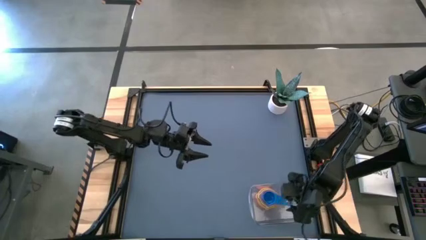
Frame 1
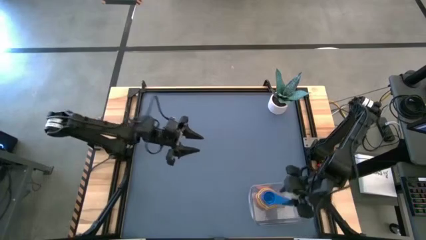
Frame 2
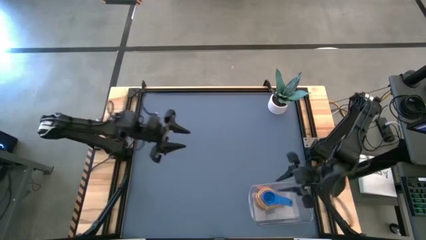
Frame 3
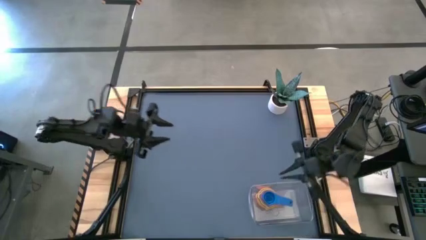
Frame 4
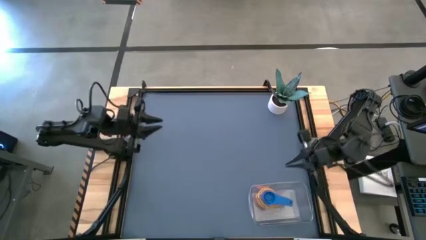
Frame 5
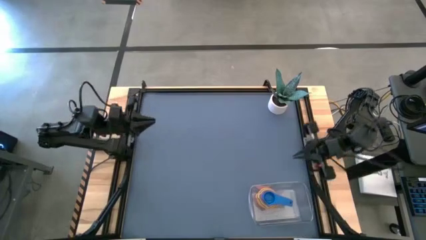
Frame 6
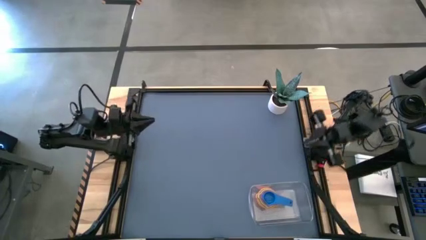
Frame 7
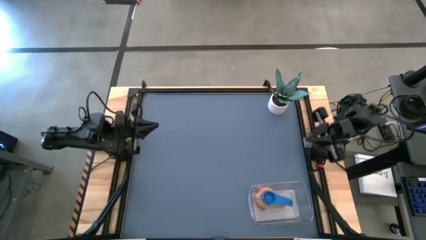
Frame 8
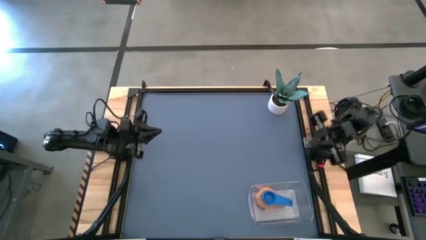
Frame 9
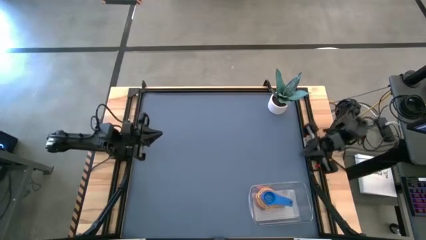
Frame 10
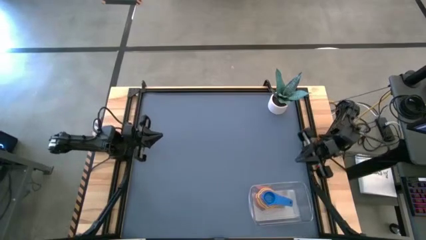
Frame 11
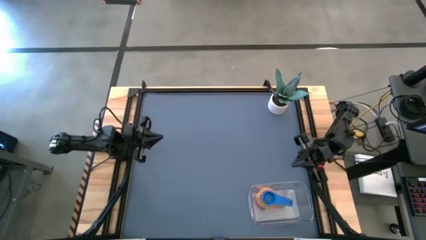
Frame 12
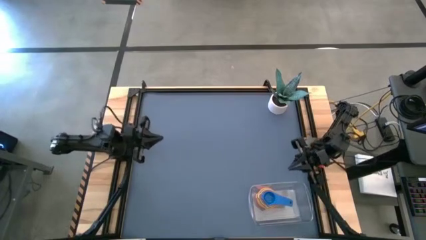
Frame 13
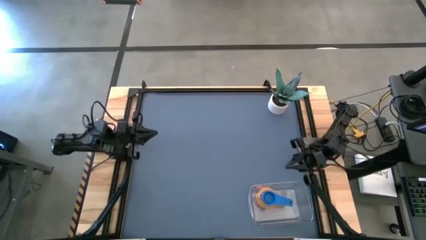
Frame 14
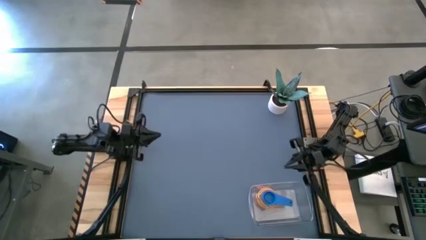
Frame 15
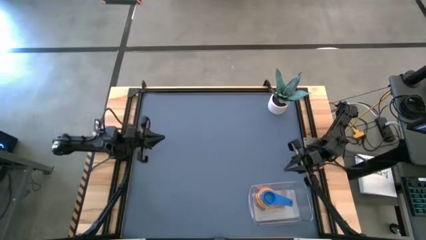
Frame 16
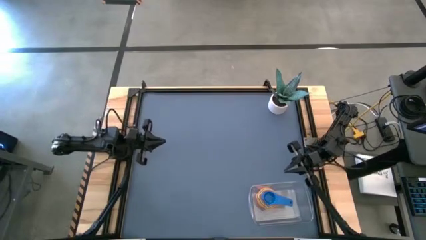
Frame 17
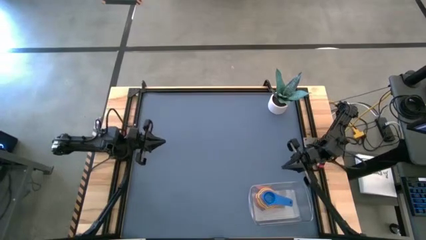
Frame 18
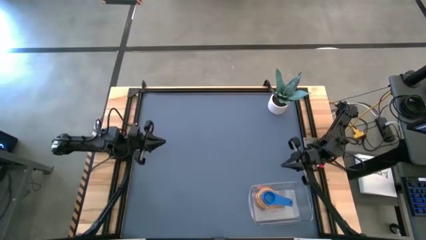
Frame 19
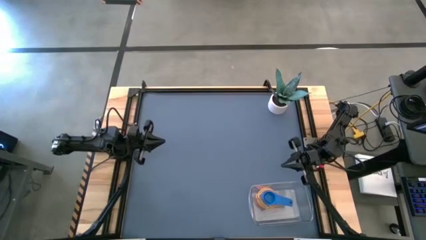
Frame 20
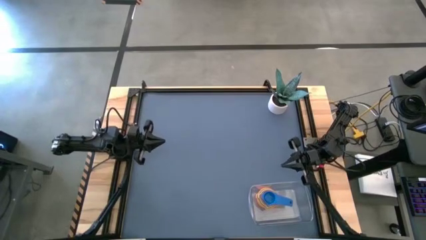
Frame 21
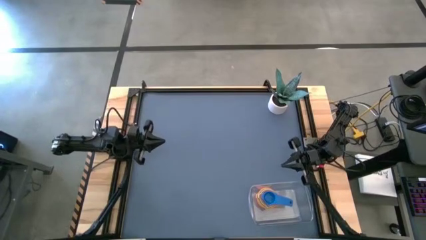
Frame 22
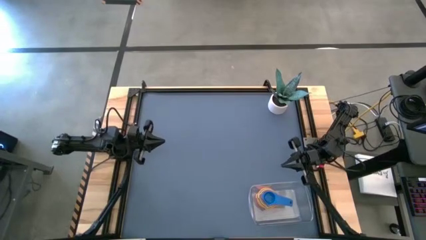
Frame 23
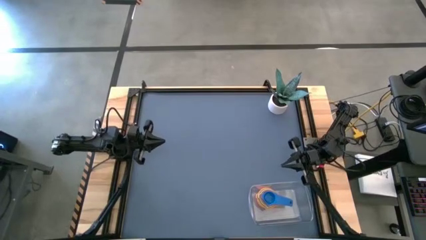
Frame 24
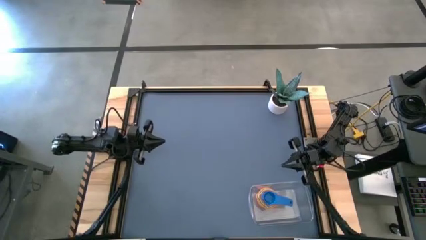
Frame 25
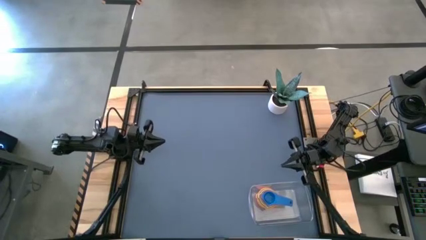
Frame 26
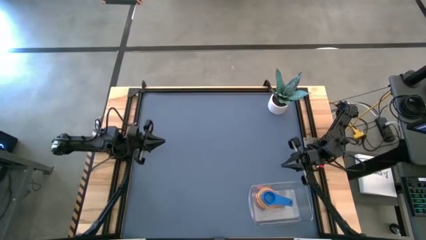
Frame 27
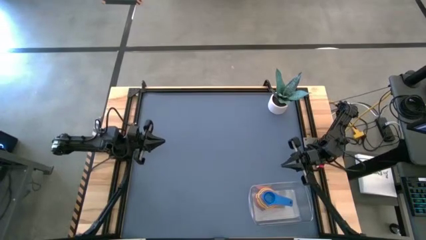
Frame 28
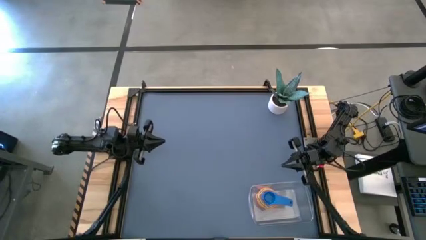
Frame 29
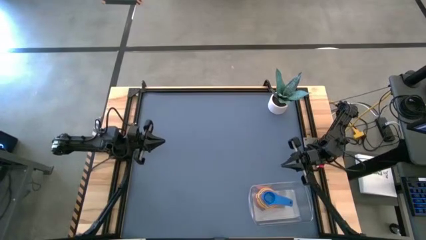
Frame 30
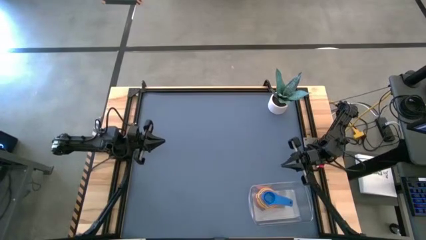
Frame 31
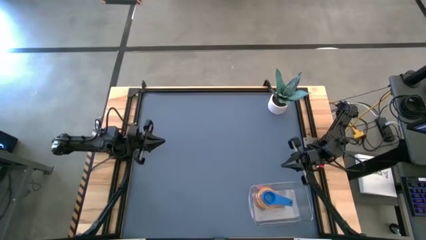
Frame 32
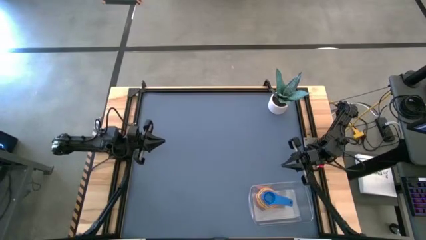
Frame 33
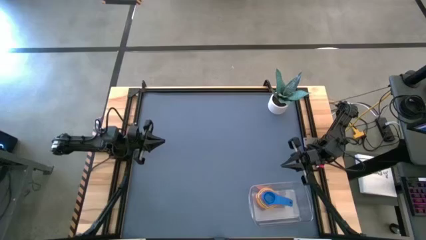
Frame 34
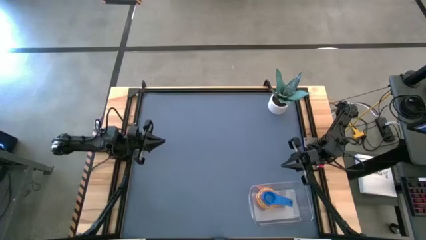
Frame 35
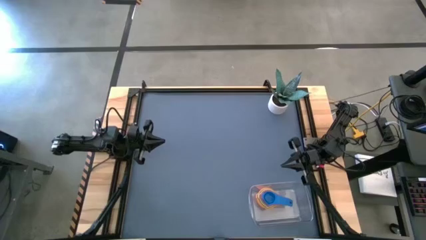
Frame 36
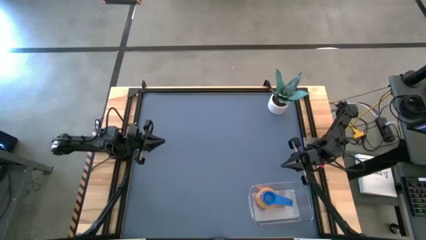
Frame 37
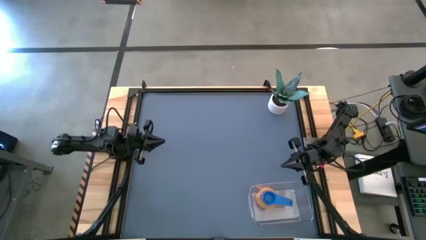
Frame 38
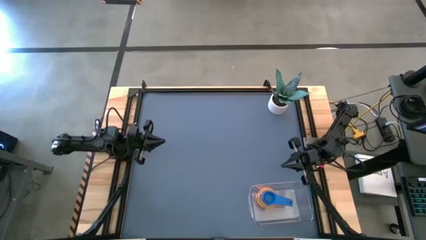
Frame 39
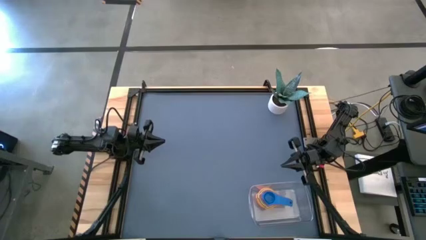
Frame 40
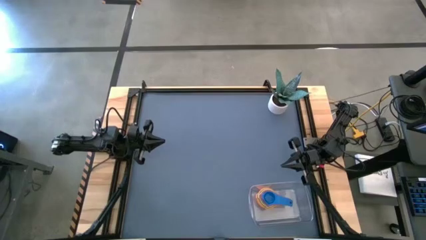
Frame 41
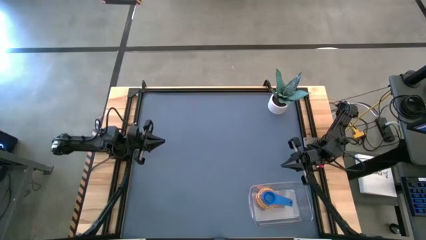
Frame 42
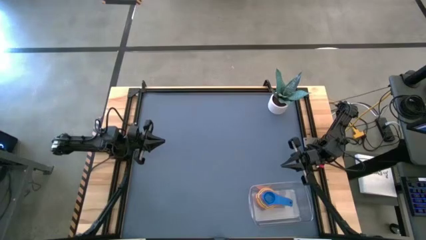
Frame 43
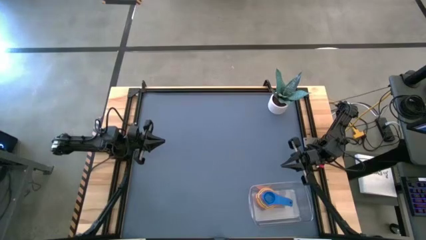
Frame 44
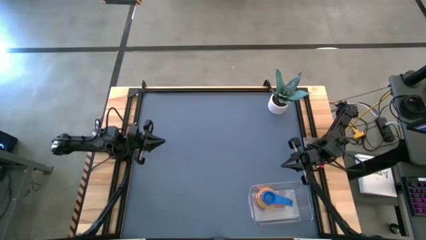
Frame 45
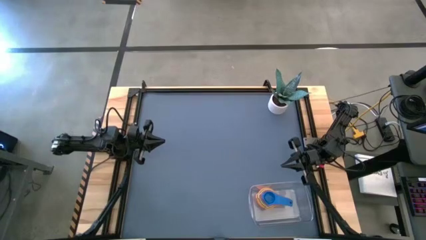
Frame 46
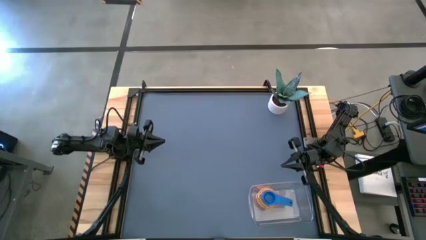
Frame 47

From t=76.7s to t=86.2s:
Task: Nest measuring cups in basket
Return to Home Position

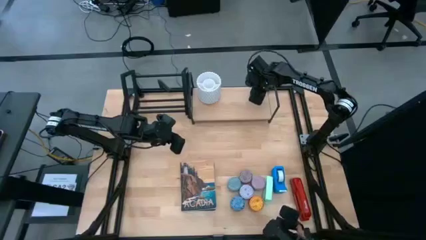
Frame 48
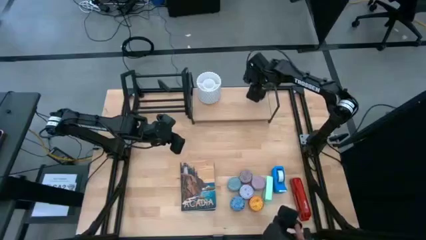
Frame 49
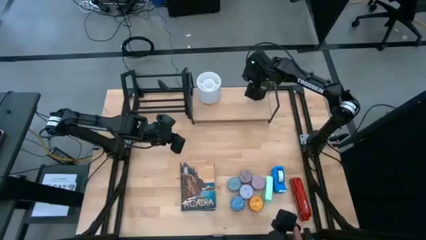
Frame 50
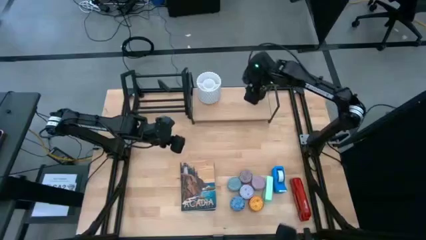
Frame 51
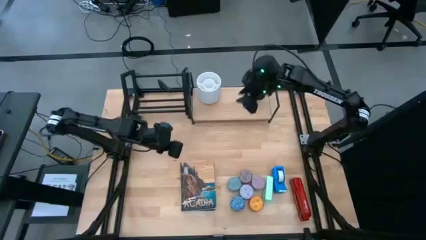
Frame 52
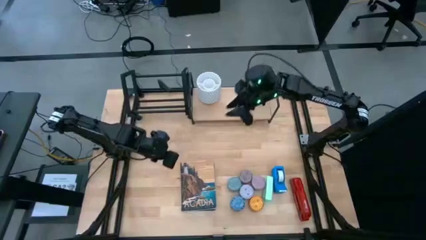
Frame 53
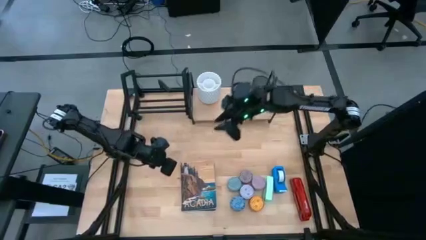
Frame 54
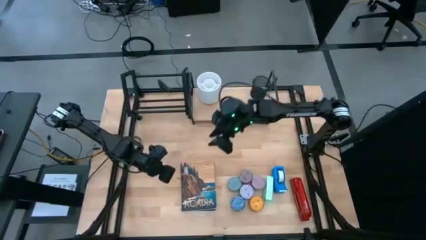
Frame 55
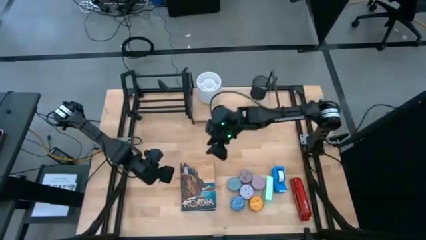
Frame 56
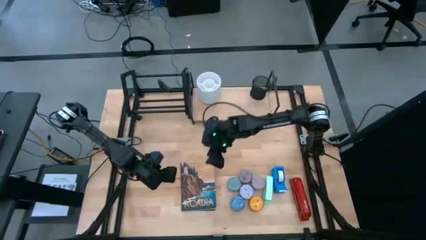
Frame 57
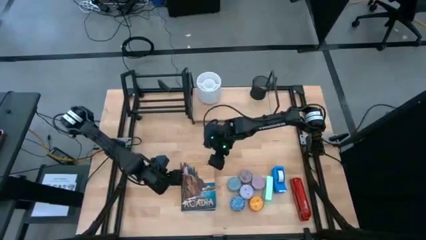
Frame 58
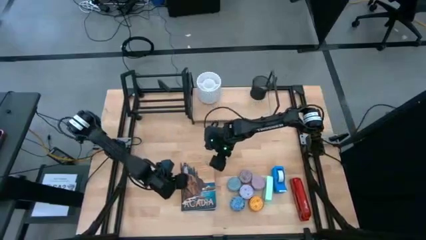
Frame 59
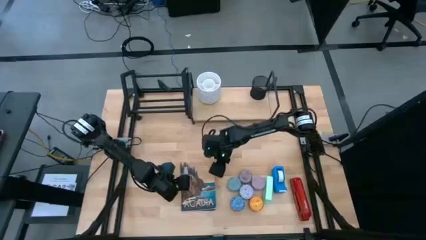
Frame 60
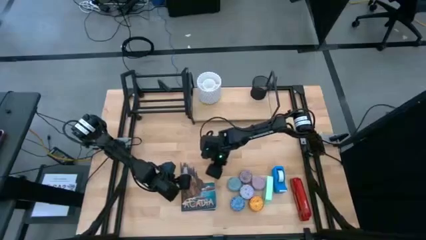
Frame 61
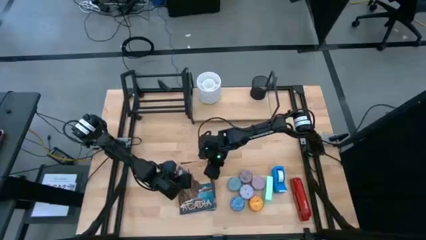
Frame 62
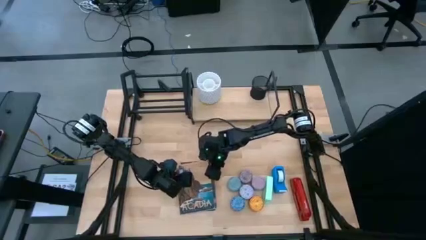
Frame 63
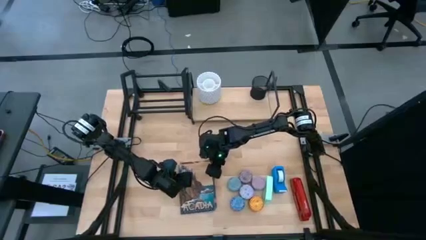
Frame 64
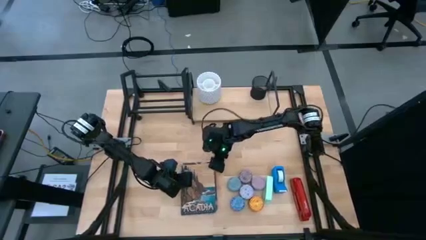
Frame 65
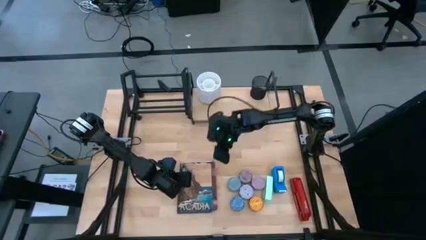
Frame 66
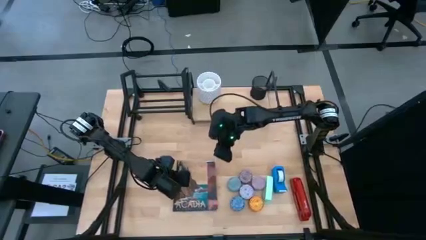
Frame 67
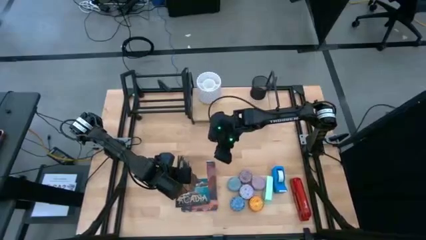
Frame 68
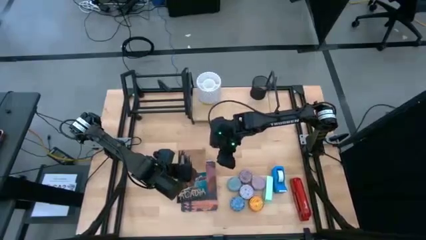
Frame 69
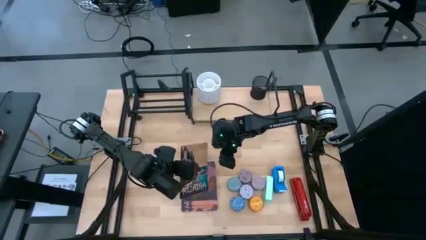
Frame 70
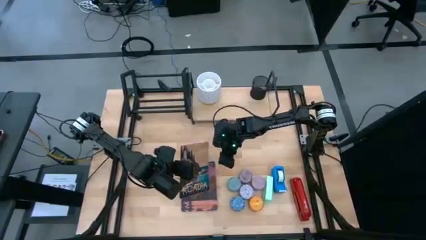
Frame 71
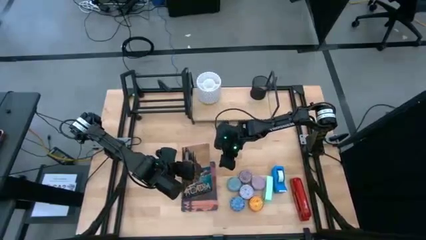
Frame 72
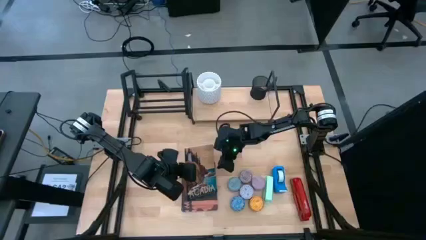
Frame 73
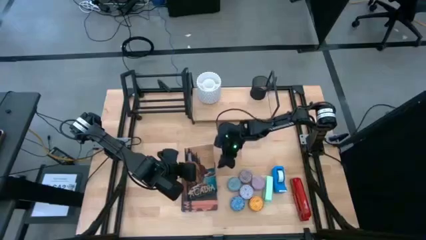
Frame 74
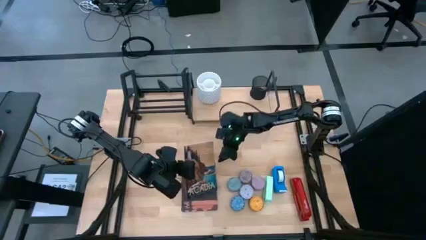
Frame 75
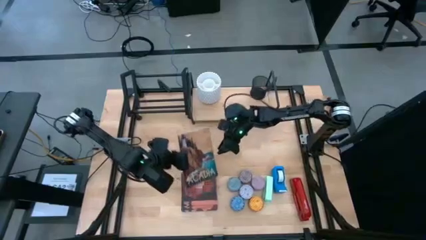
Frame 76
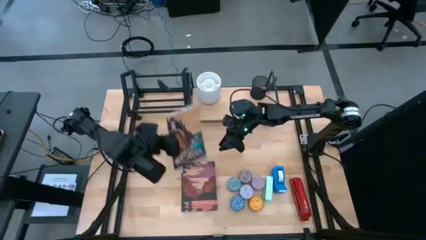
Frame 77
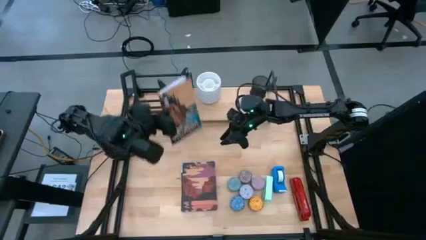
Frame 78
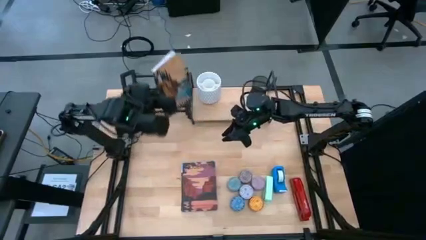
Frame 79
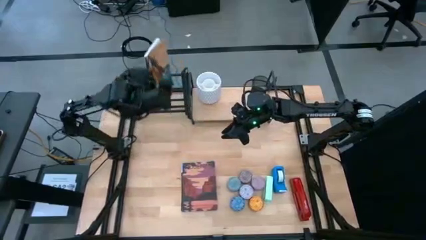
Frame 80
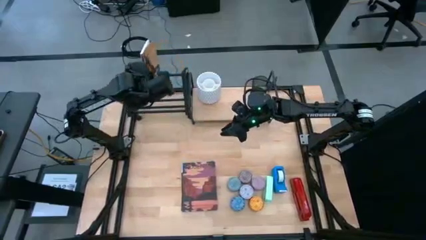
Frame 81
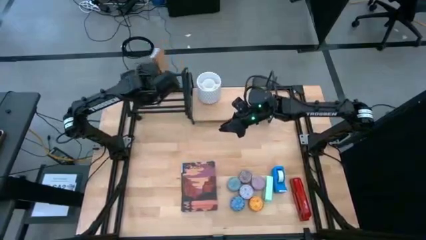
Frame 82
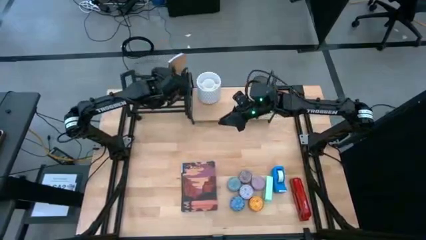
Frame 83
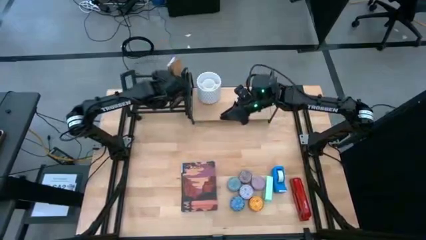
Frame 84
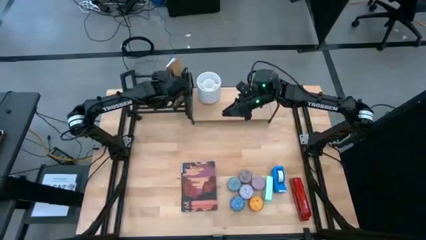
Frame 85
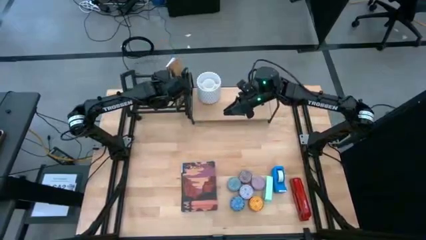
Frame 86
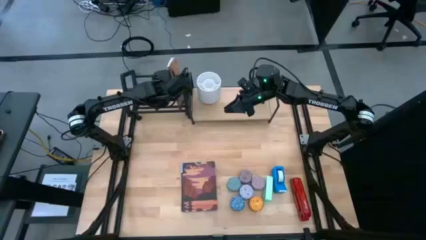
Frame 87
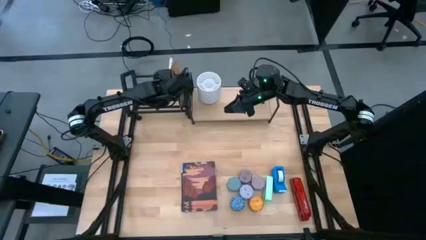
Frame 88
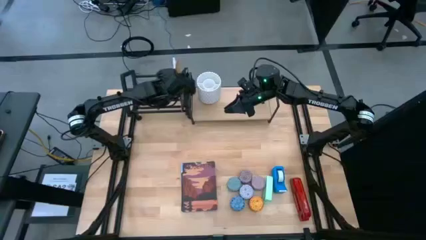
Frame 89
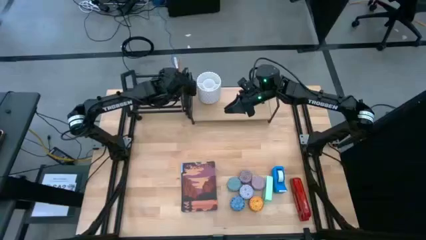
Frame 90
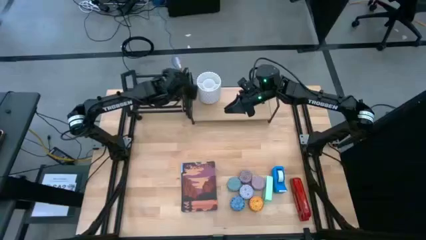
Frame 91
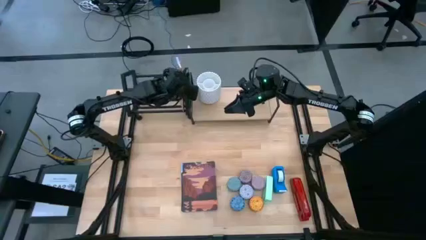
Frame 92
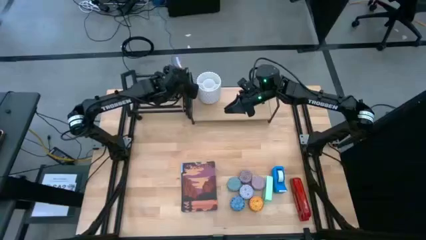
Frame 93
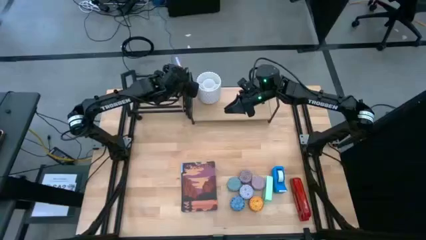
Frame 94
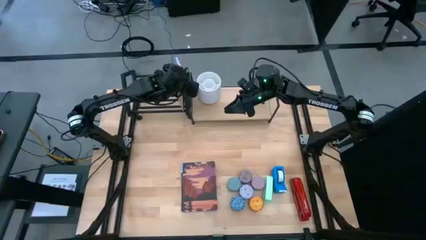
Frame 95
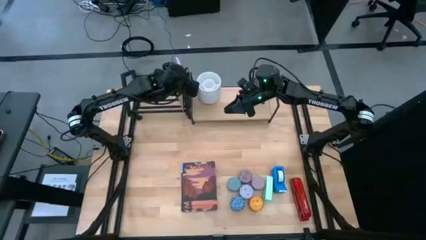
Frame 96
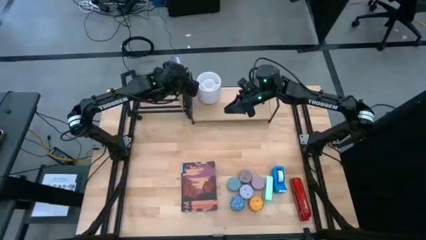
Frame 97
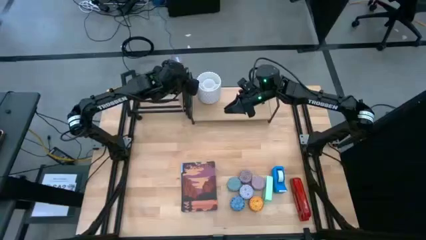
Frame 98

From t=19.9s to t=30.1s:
Task: Stock shelves
Put the brown book on the bookshelf
